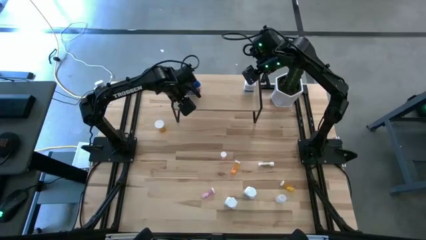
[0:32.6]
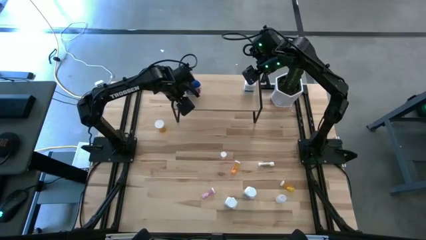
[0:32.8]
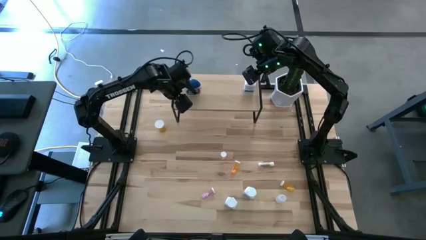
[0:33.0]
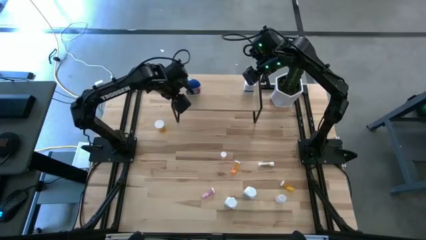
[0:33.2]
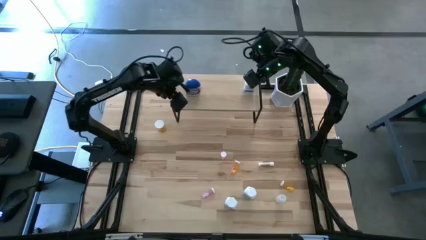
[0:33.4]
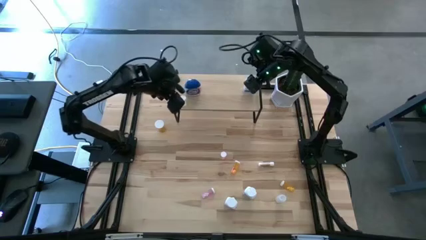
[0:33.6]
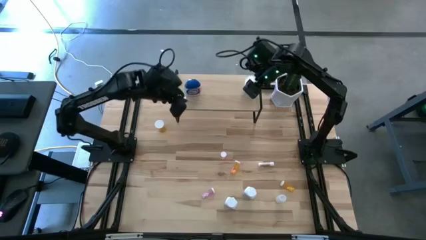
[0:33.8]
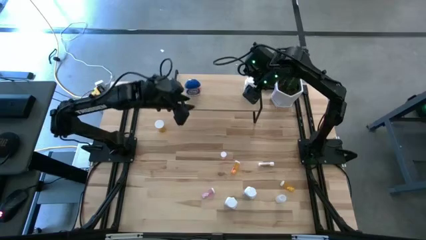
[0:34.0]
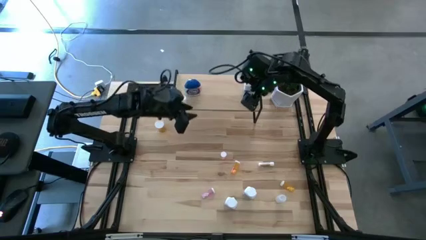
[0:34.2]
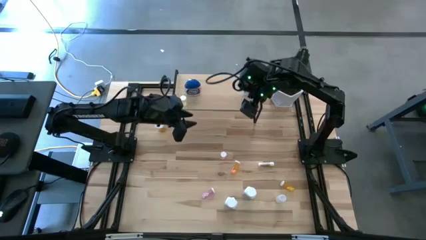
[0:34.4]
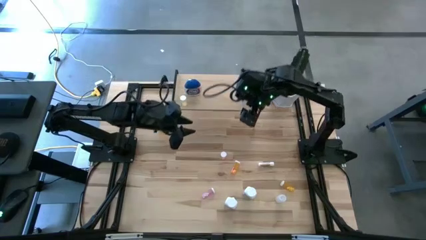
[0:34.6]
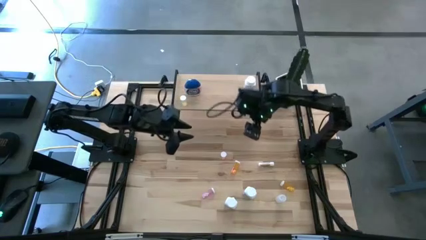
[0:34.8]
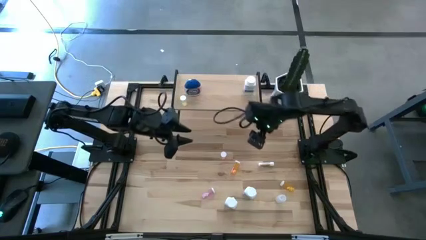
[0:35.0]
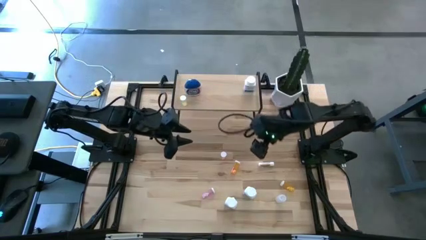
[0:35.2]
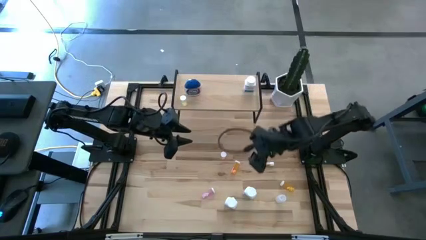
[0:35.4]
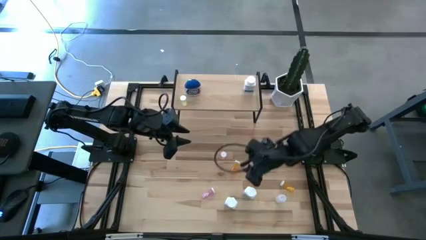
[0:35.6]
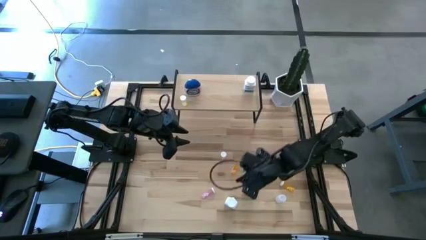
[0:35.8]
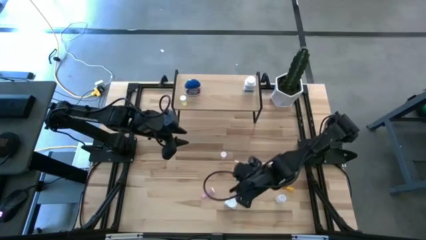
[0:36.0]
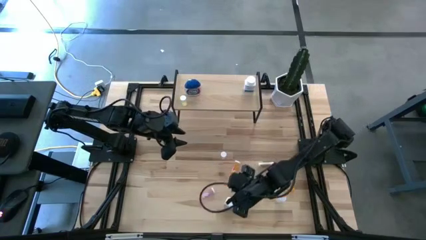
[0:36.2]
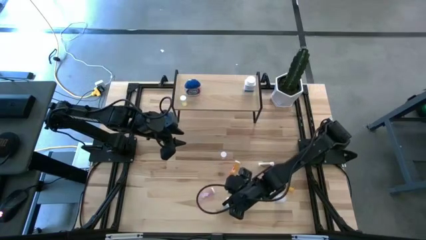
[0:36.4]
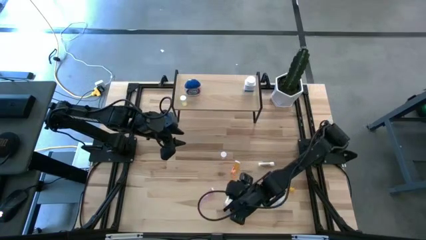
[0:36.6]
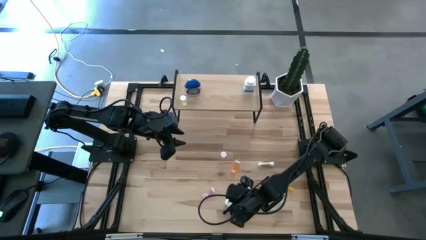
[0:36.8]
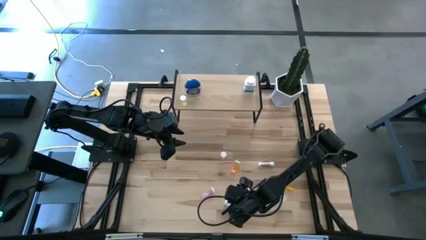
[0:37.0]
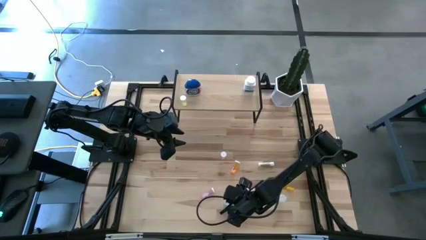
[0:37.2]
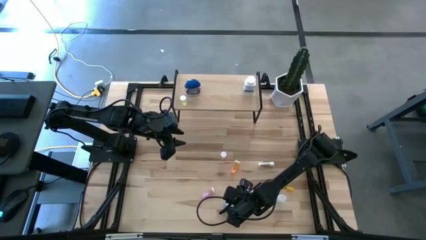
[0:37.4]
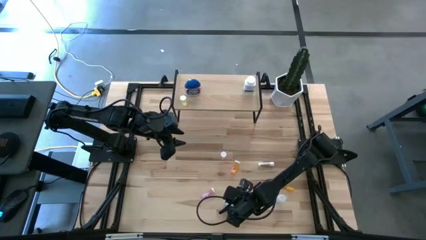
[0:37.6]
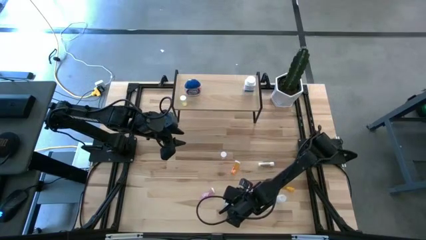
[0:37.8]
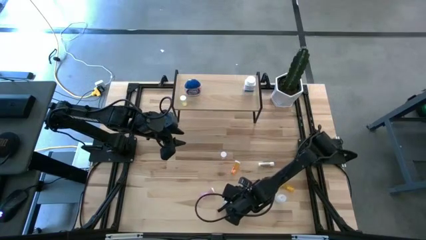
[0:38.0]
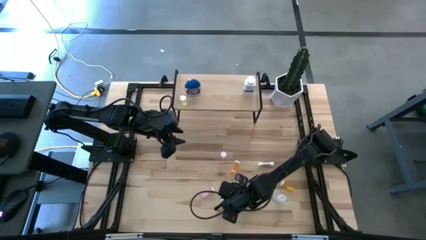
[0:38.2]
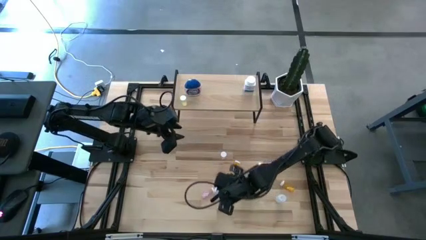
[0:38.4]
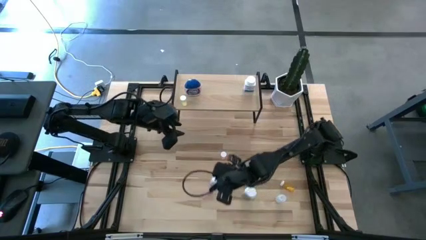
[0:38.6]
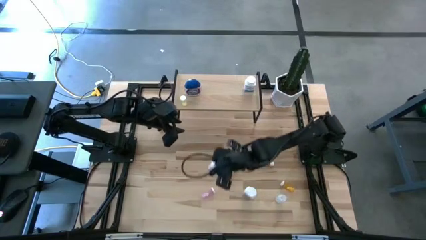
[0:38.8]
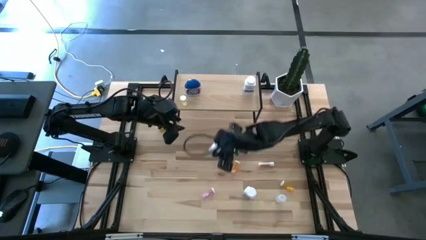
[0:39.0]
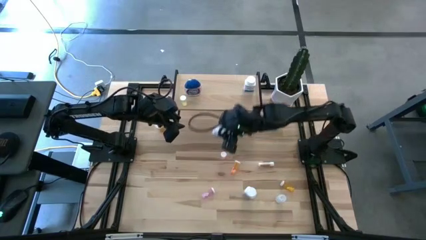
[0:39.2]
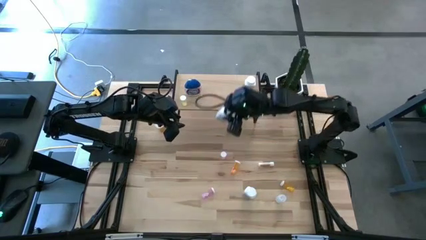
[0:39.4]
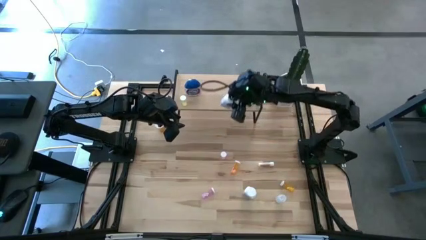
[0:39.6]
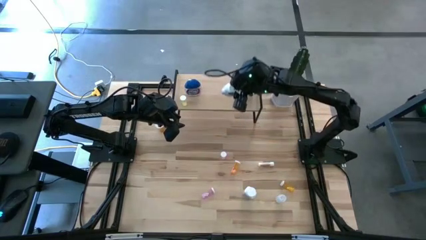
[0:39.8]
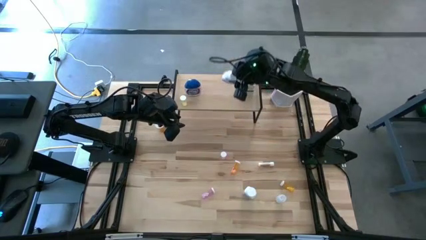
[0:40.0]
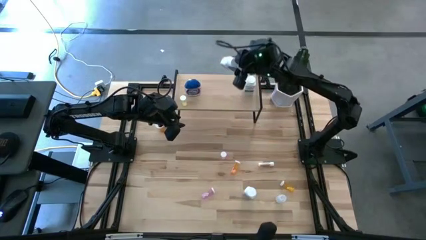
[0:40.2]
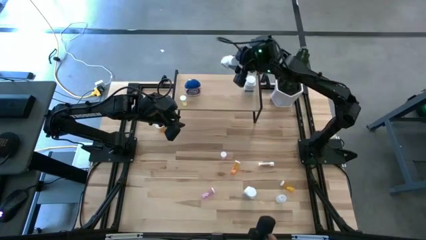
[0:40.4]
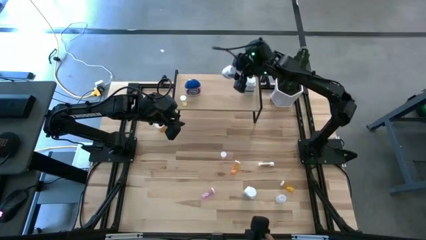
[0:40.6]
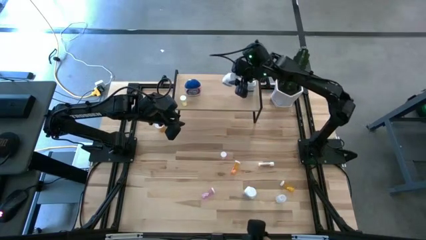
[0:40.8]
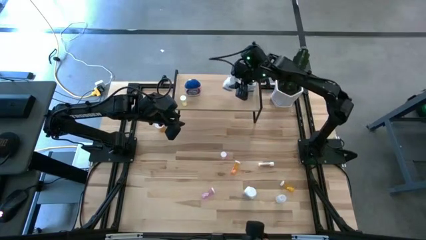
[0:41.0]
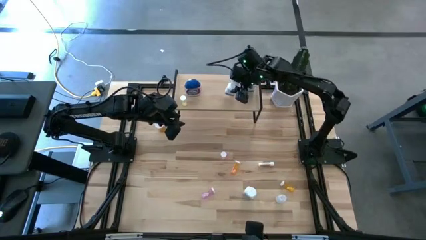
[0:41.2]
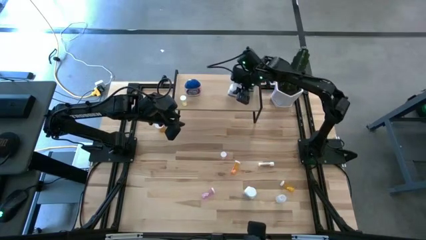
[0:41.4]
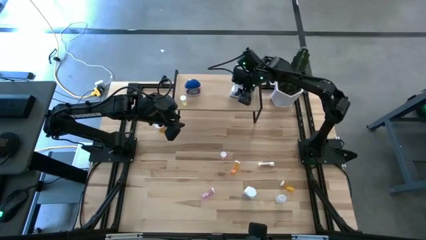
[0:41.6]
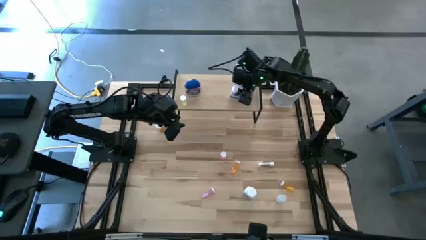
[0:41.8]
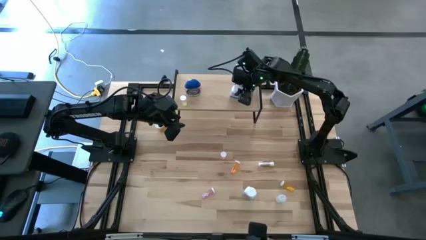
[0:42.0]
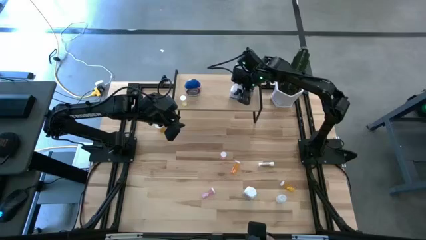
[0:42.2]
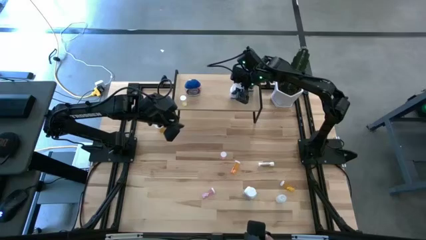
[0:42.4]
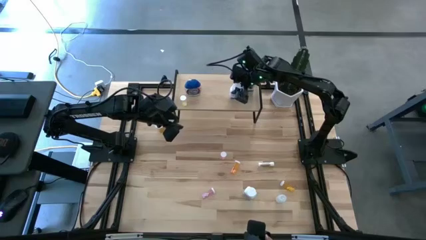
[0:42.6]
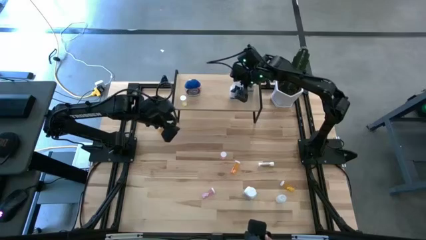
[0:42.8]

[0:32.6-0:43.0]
Task: Pick and place medicine bottles onto shelf by color
Put the left large white pill bottle on the shelf

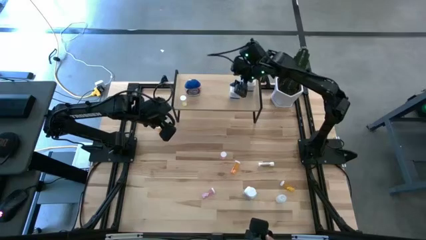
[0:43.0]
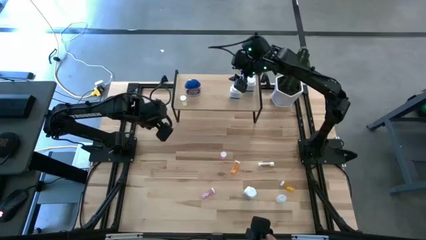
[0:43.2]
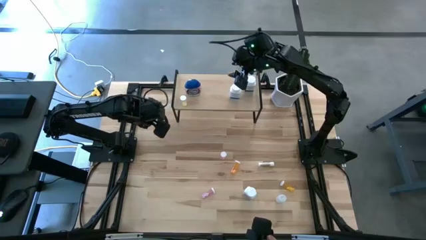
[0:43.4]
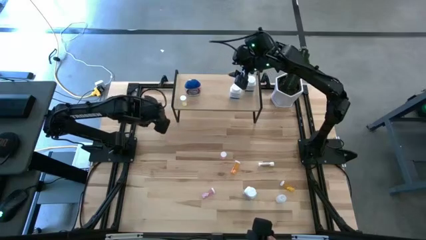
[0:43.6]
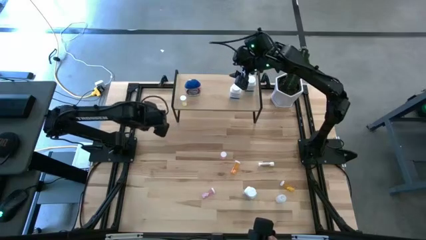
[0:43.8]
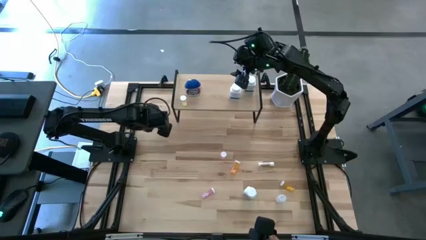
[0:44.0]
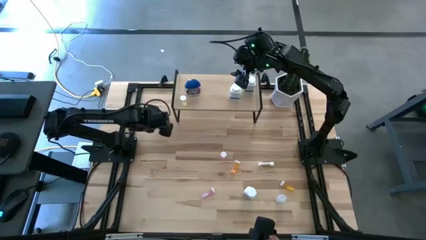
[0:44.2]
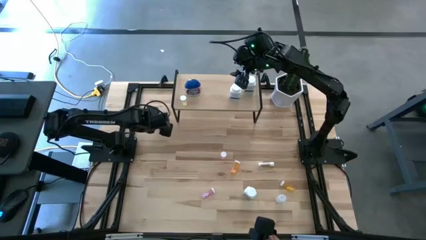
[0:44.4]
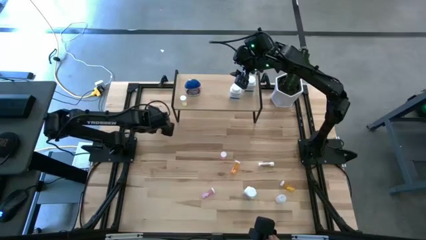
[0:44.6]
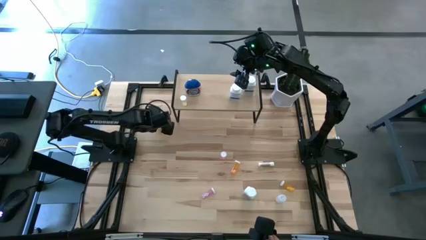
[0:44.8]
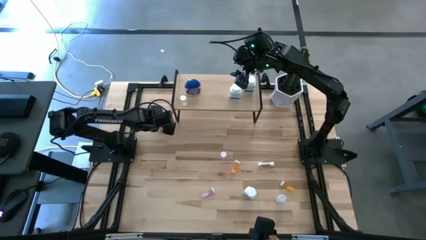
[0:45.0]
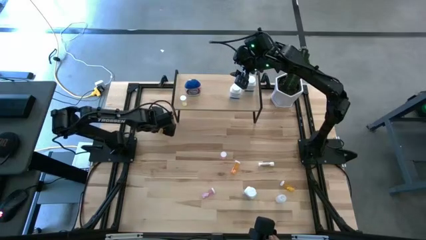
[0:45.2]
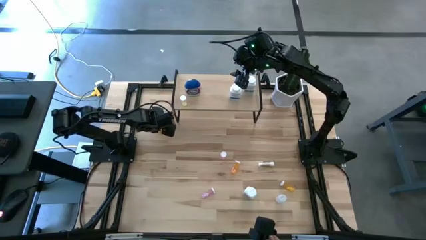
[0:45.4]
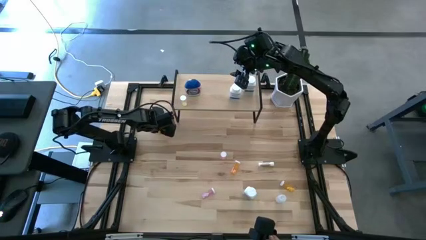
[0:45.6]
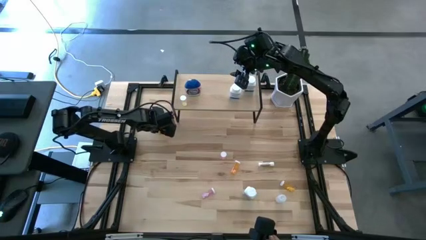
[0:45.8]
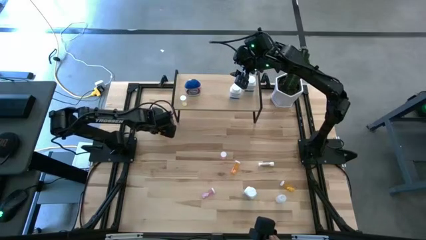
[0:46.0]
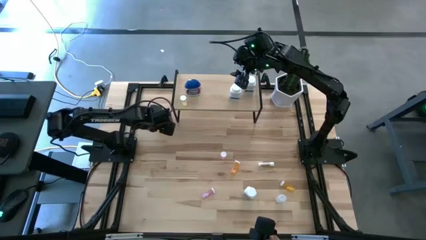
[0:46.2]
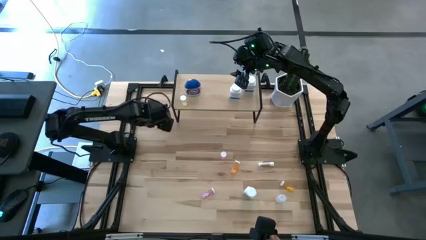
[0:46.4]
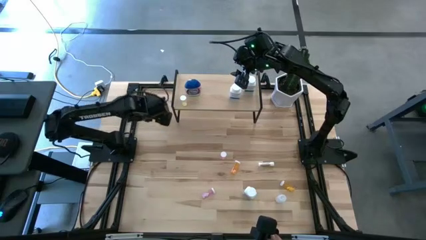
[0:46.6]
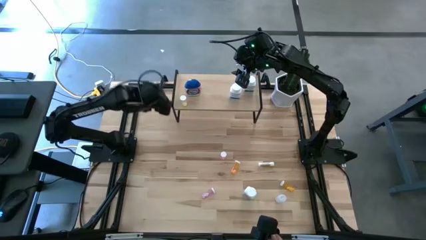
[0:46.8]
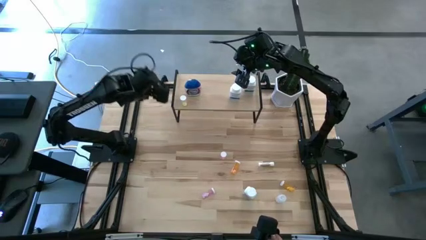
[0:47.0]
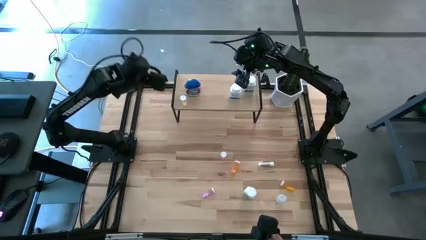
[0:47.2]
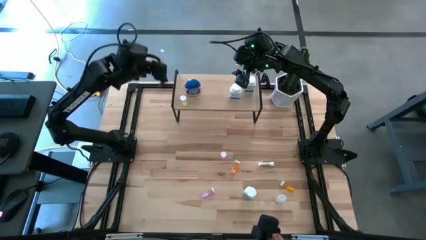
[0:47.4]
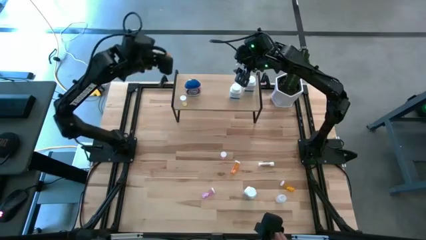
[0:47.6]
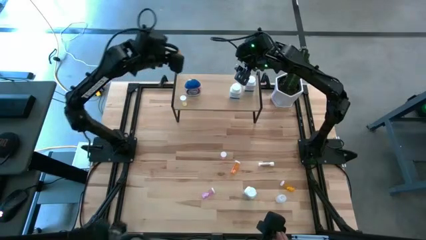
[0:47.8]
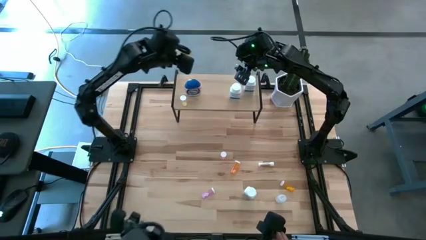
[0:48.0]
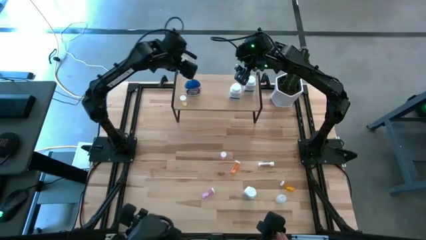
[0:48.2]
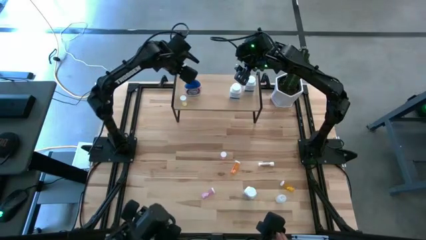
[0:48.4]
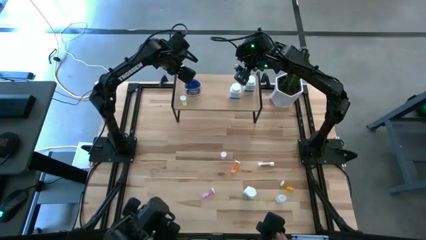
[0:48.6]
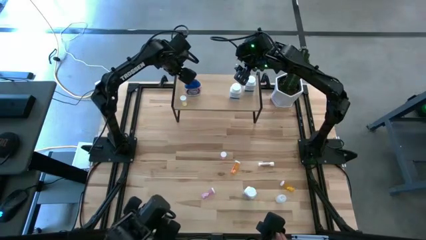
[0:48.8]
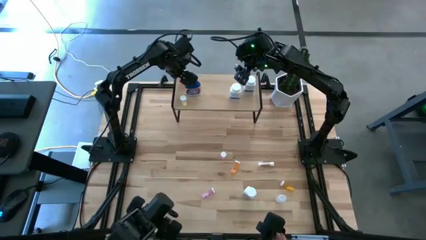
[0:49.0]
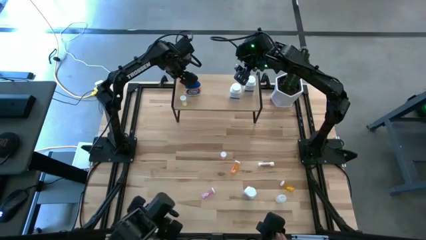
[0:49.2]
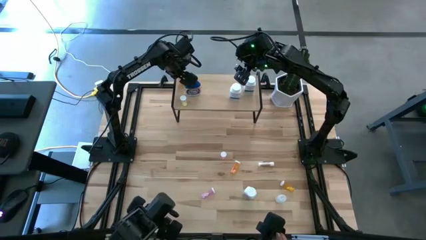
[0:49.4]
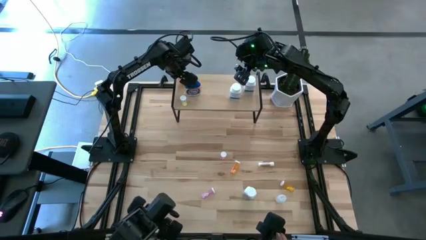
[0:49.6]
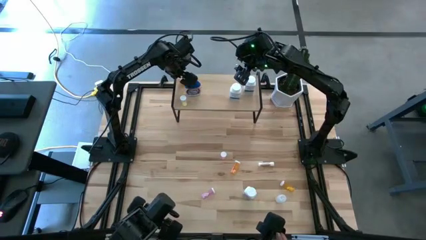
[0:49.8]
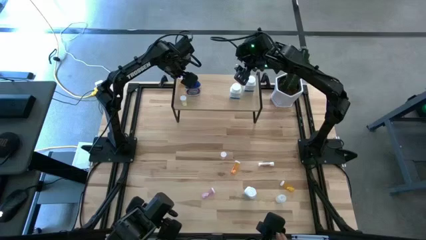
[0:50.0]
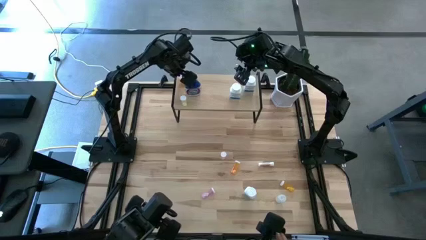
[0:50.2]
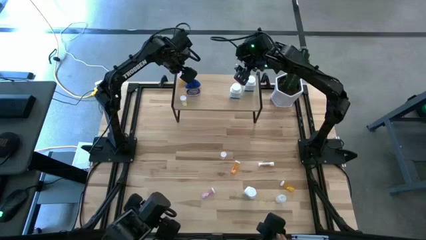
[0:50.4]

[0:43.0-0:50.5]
Put the large orange pill bottle on the shelf
